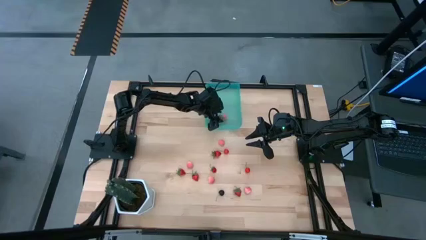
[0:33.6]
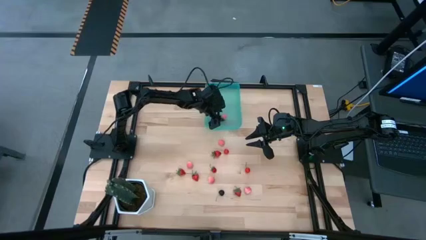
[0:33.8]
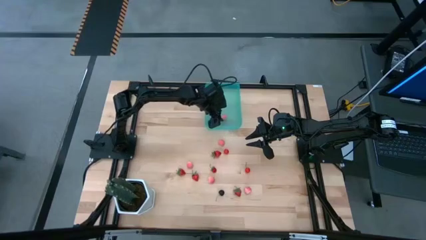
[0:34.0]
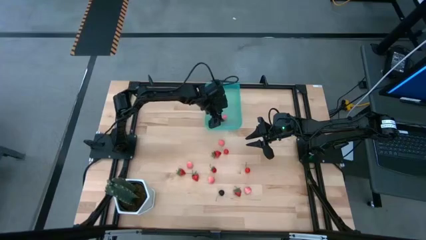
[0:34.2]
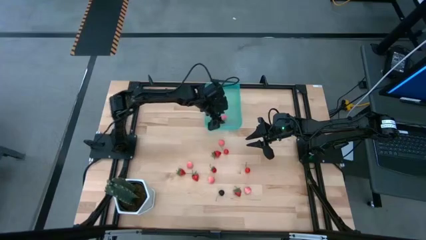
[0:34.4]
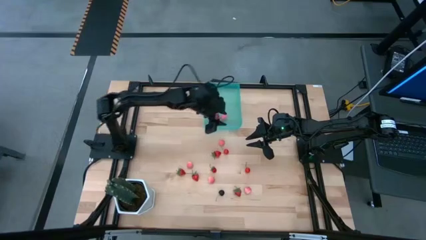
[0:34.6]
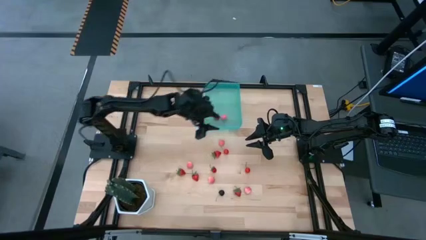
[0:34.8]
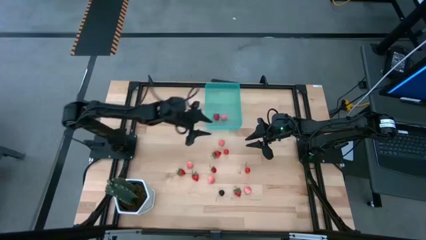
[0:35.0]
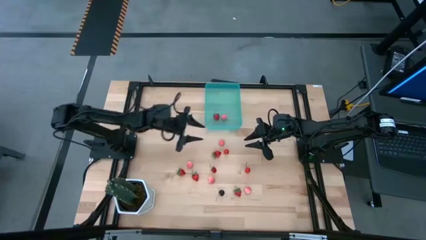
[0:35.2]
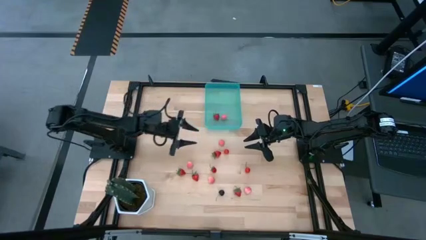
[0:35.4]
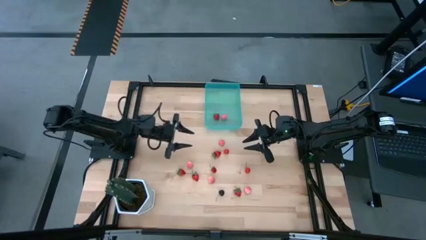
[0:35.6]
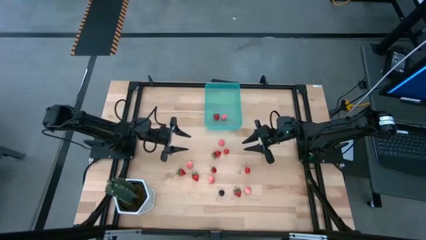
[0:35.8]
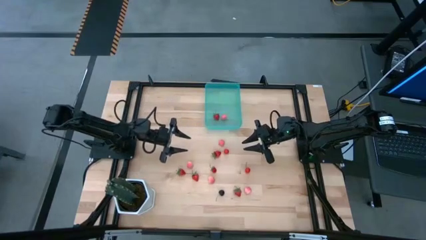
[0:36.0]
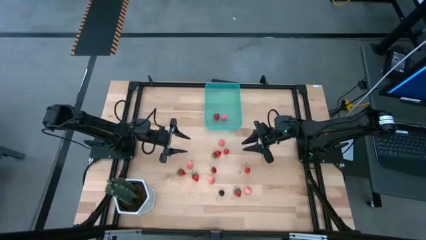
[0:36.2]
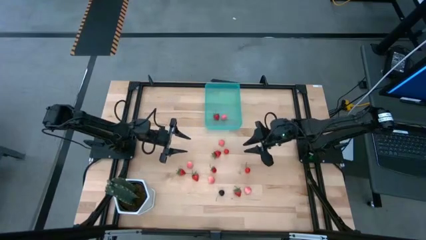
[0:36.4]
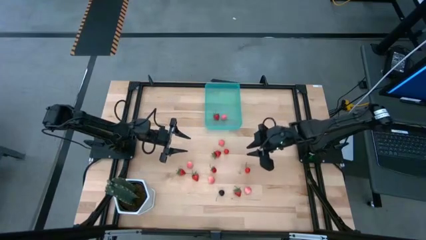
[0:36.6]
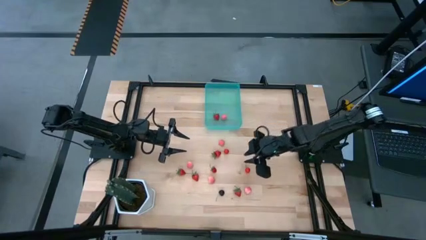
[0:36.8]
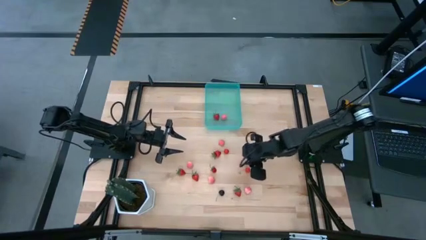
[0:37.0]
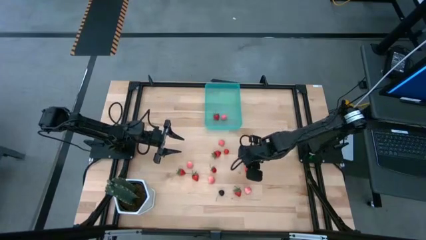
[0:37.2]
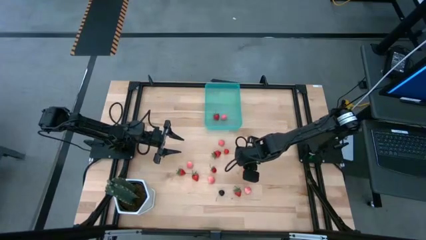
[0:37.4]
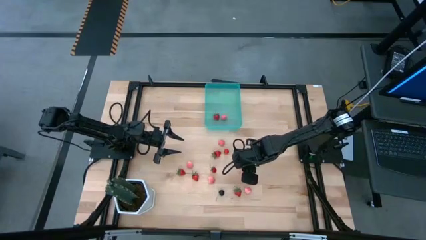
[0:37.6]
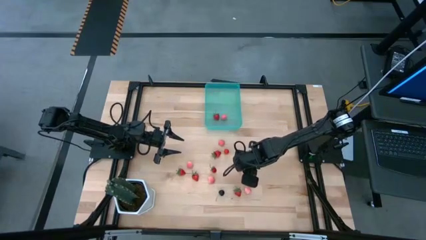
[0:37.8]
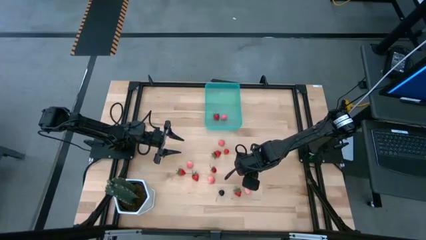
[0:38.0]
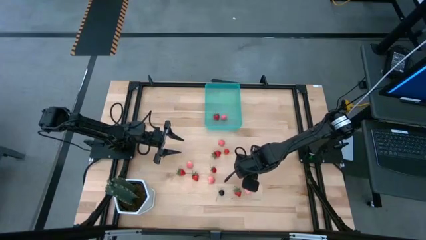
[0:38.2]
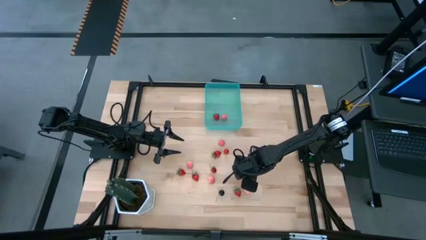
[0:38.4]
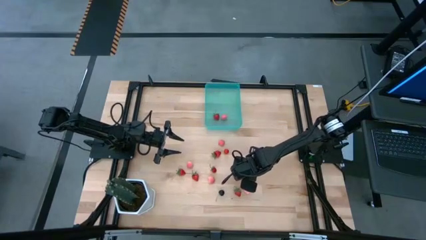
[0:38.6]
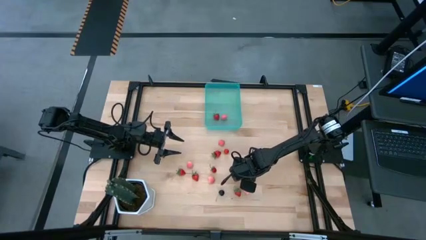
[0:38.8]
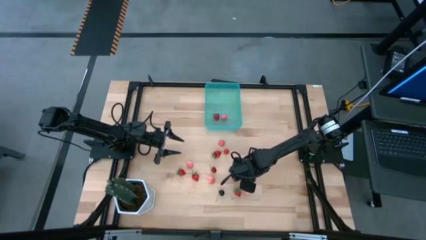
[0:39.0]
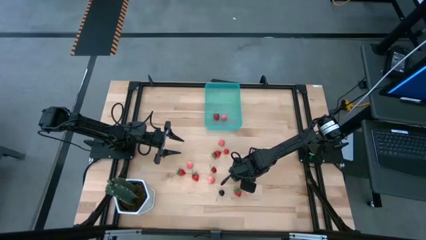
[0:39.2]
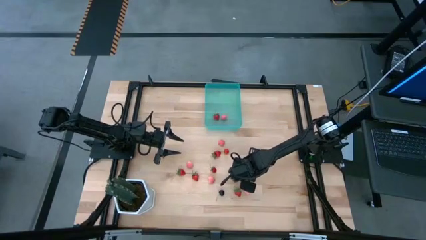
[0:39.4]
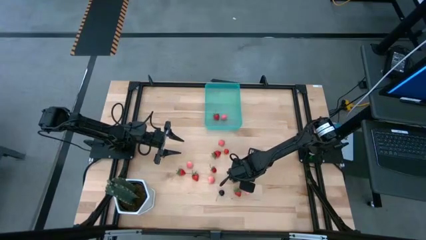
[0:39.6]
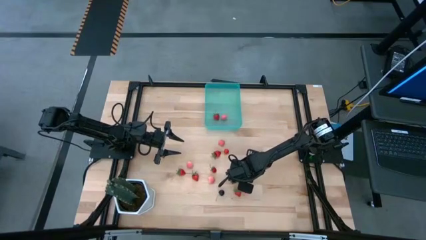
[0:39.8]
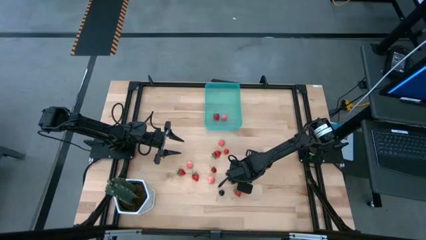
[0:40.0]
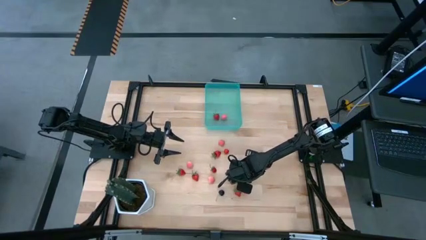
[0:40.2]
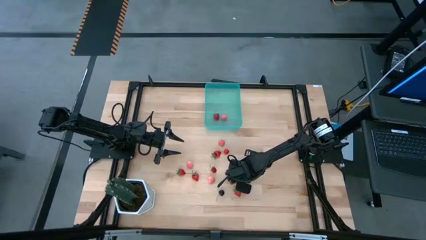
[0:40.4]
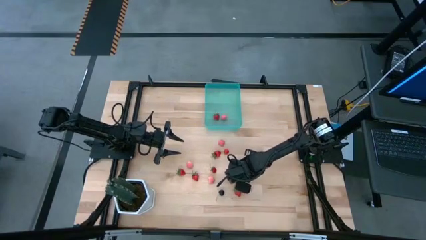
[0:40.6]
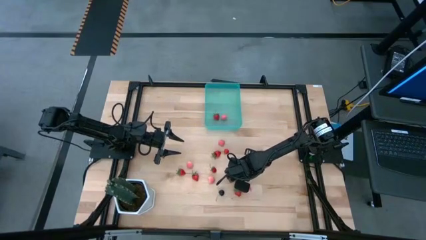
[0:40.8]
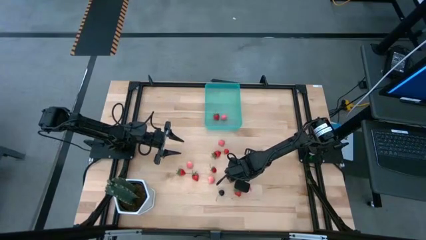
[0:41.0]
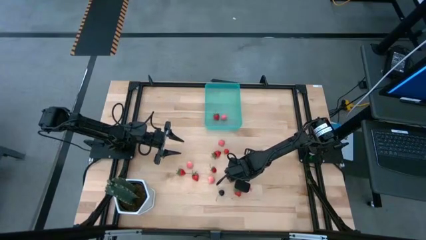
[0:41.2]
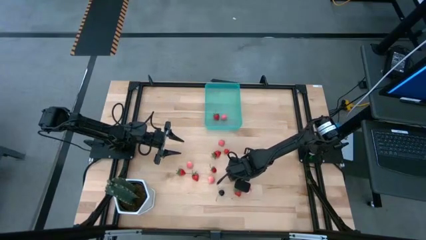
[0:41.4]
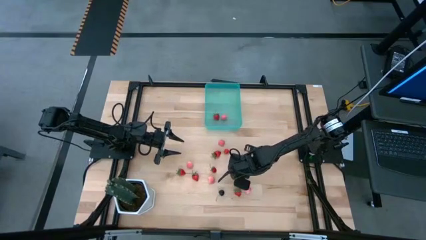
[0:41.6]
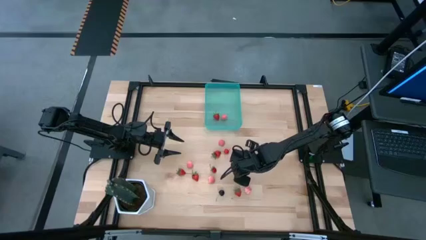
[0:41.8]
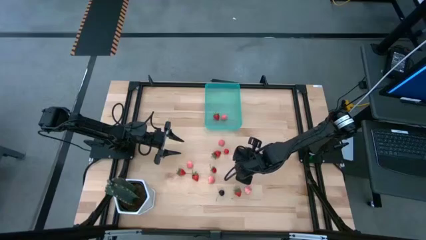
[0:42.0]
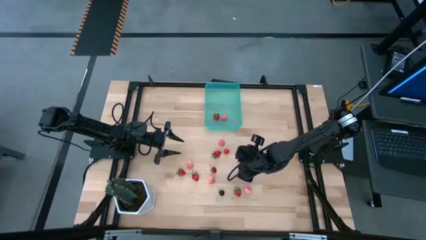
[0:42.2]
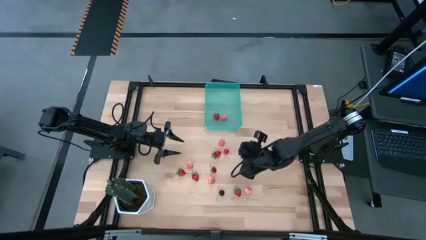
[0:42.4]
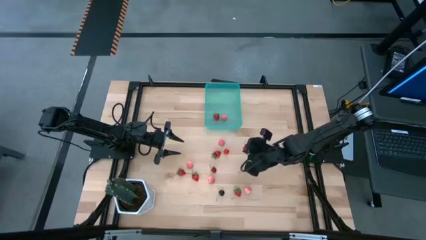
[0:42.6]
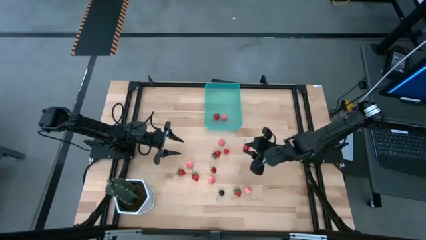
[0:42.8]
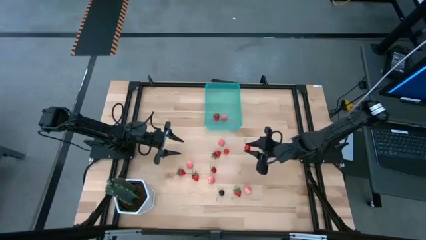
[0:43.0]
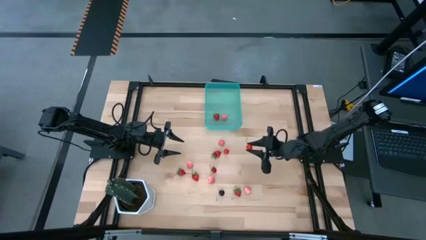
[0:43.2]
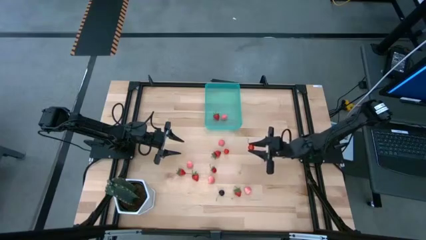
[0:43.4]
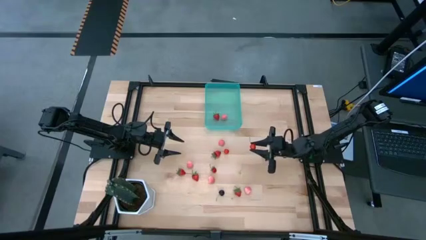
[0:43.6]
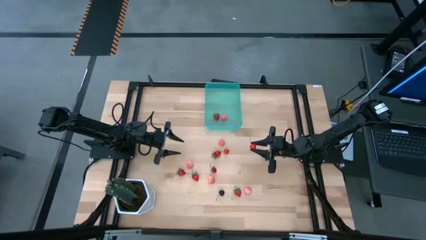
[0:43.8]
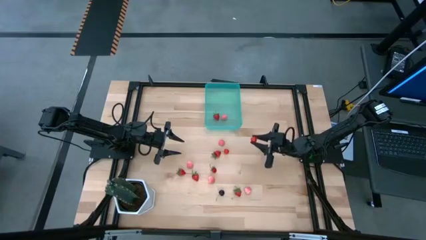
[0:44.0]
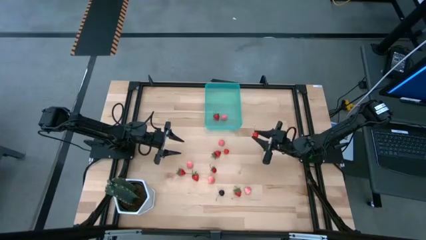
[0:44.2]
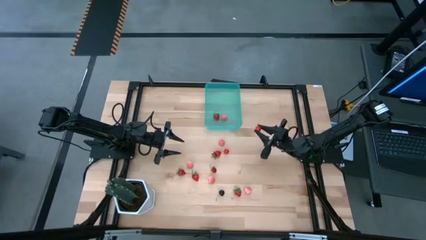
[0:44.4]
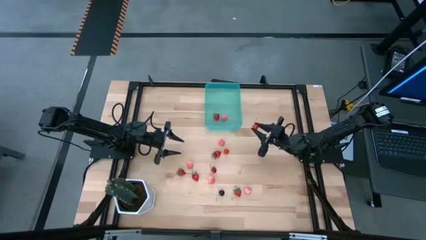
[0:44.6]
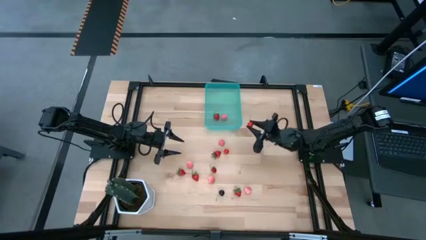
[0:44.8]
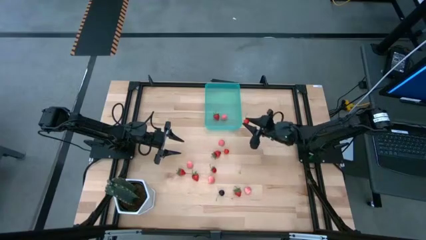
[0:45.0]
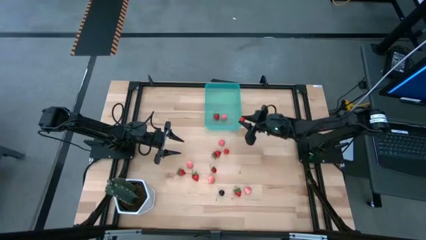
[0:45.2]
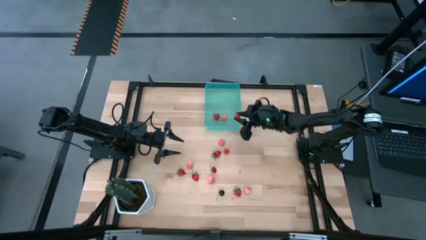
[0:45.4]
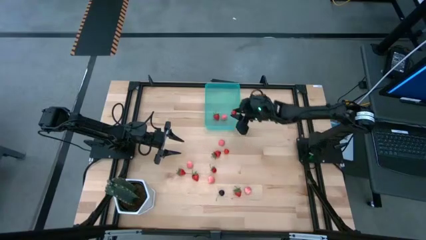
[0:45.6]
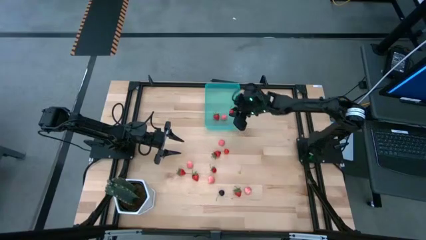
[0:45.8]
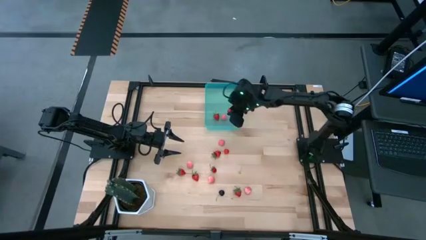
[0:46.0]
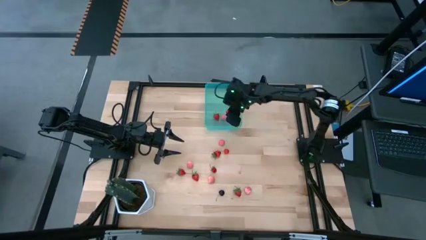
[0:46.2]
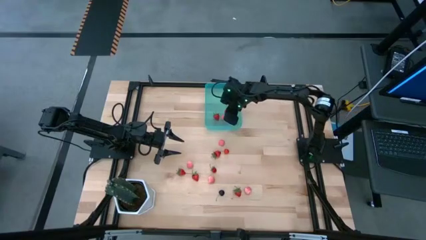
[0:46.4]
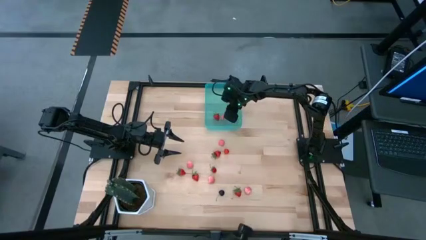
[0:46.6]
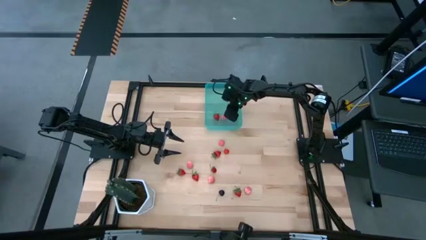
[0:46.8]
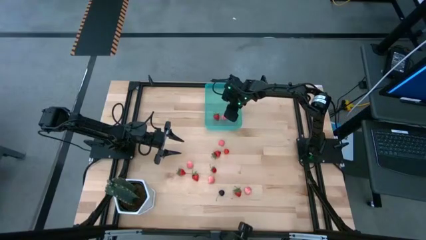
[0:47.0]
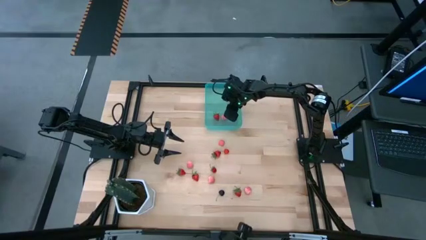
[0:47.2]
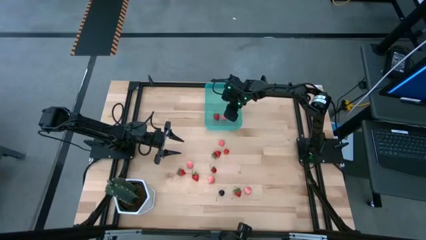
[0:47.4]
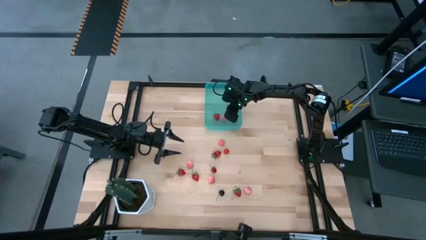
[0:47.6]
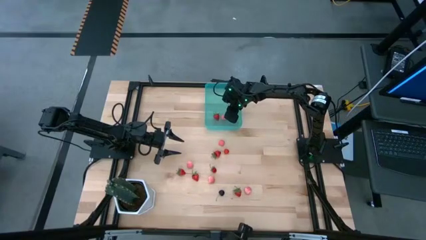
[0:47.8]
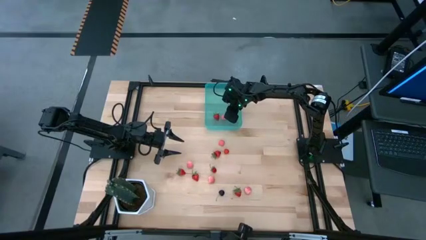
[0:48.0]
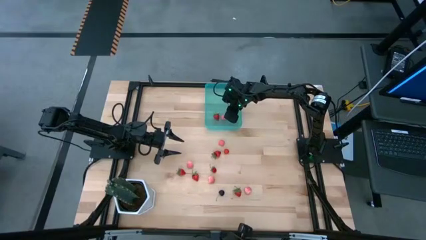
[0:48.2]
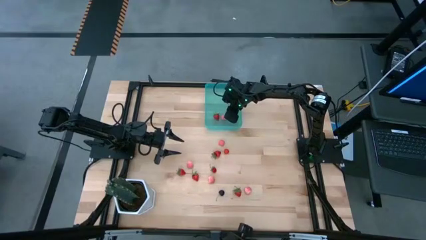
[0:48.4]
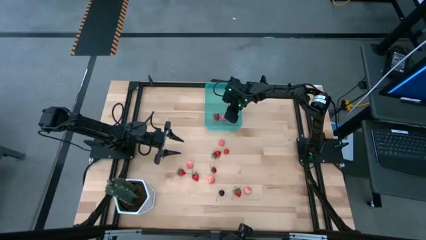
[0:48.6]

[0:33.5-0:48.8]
Task: Pick and placing Produce into tupperware
Put the red cherry into the blue bin
